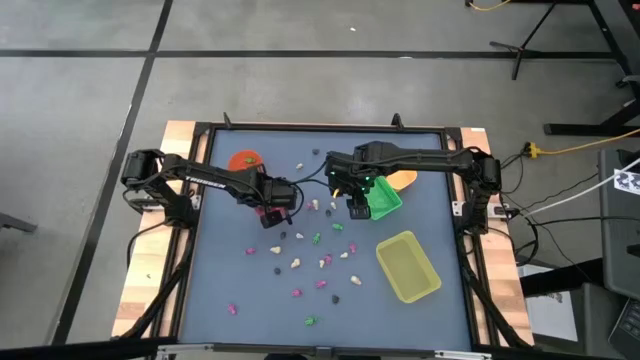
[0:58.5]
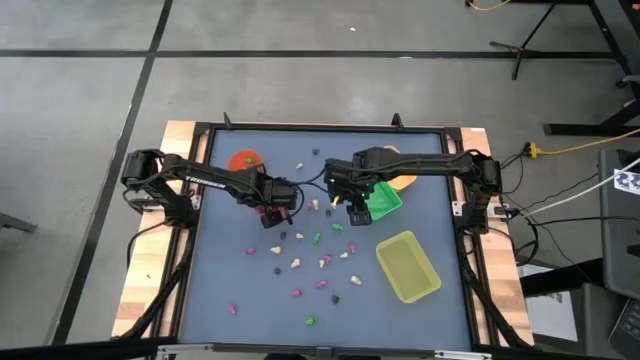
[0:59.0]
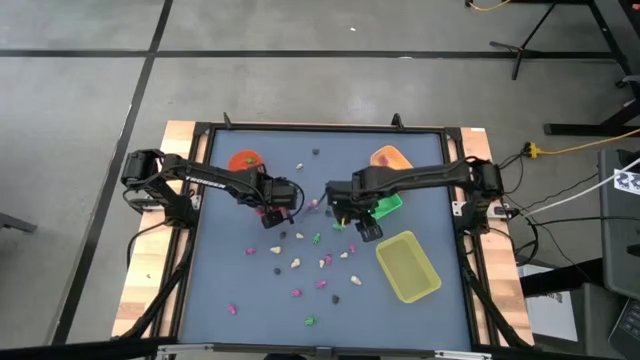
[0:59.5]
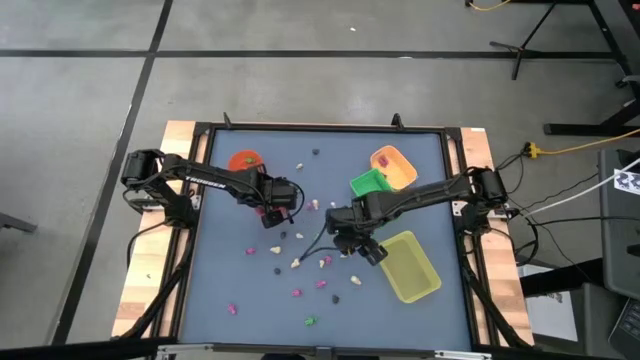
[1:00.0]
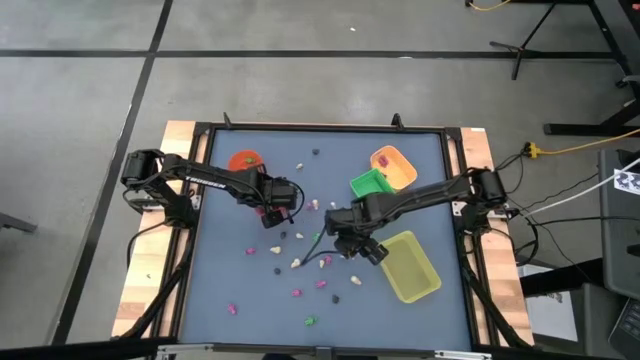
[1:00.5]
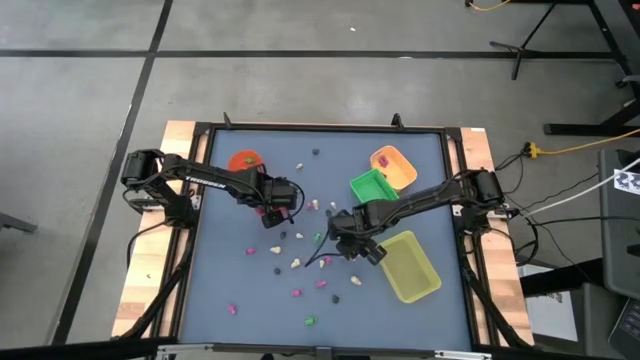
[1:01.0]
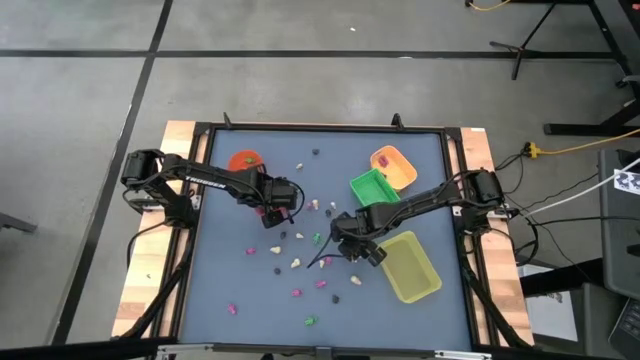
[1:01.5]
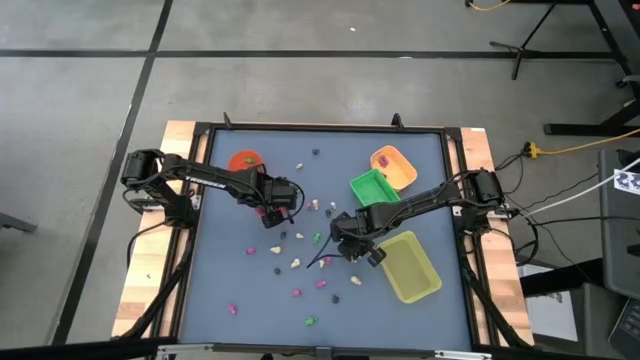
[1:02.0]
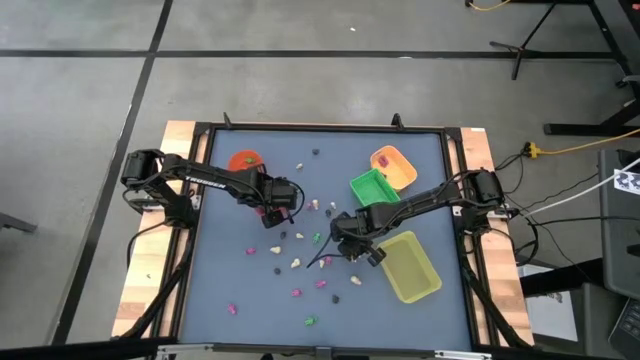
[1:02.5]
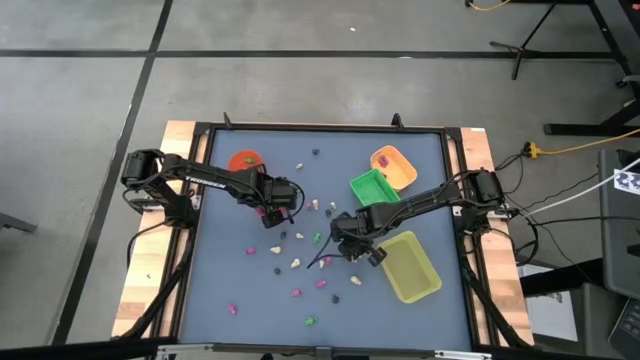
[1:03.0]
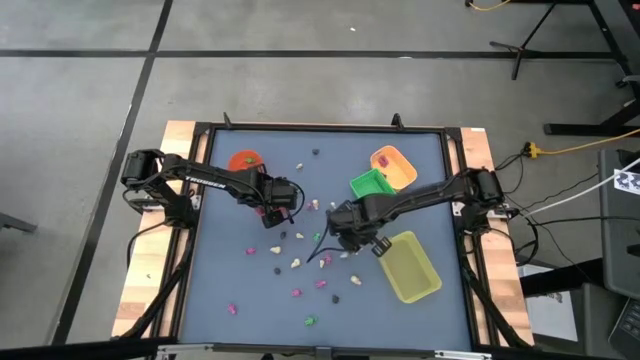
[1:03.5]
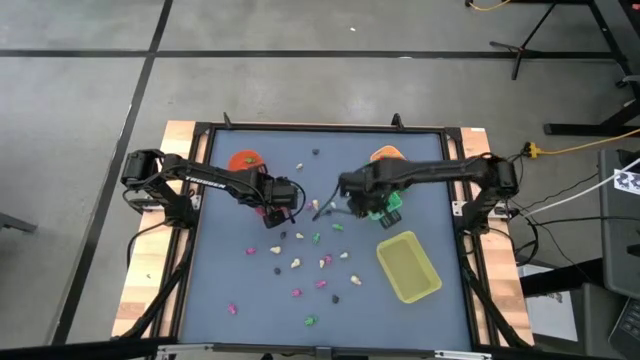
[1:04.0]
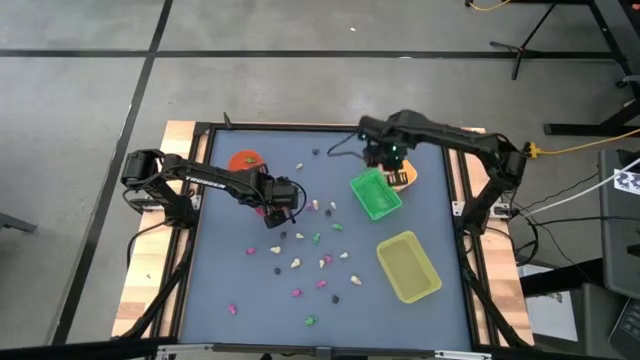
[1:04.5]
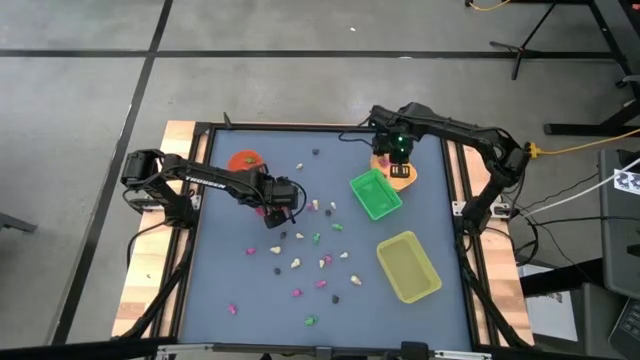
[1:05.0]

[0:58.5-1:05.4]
Task: Sort Halloween decoration
Put the pink skeleton toy into the yellow bin

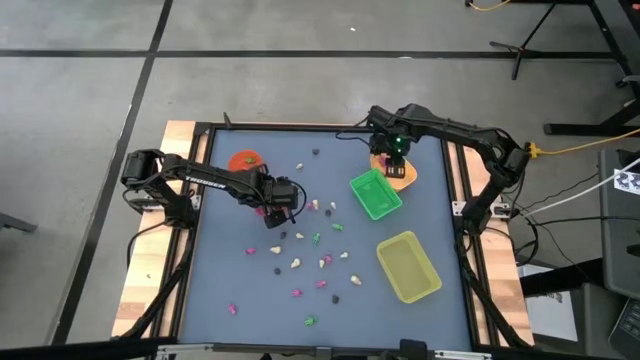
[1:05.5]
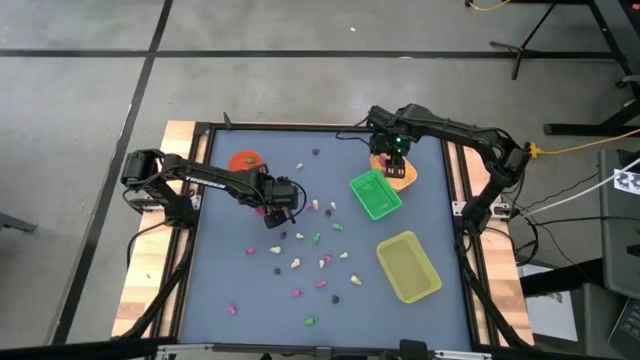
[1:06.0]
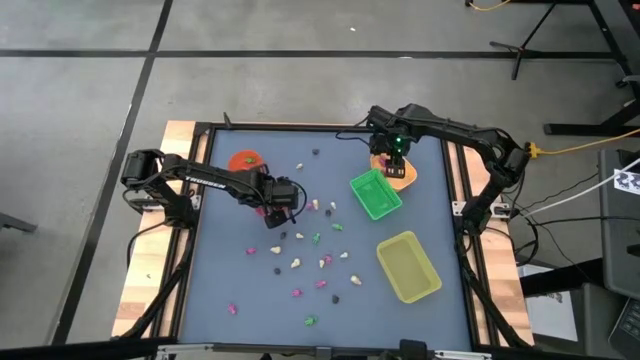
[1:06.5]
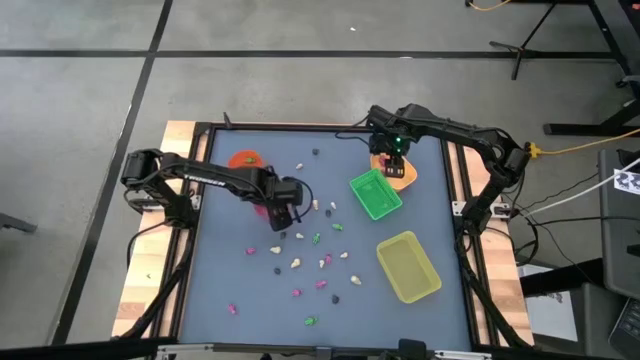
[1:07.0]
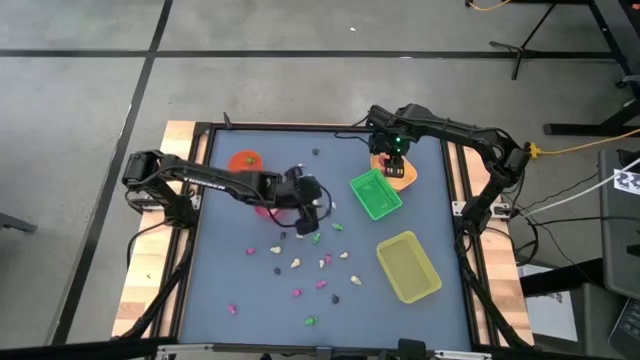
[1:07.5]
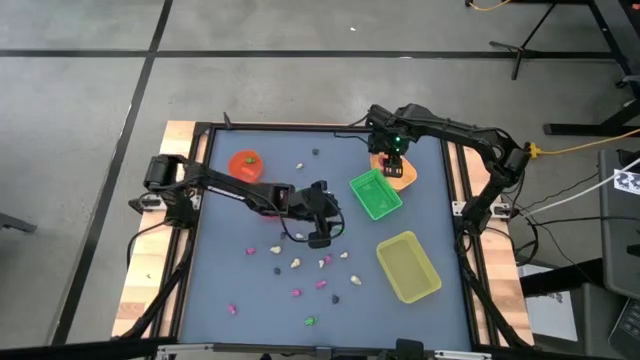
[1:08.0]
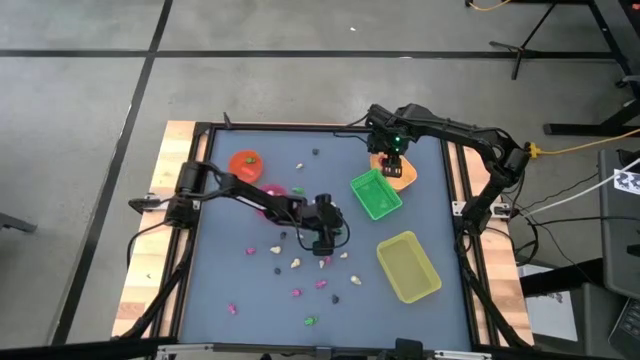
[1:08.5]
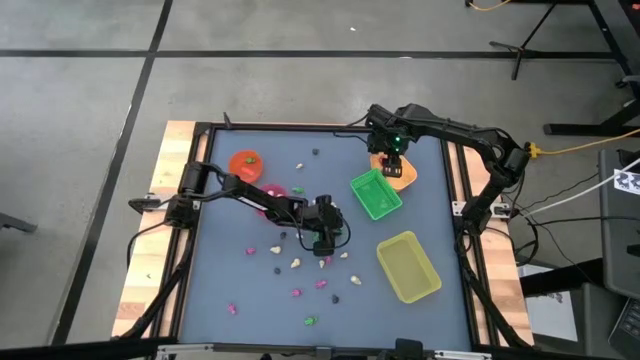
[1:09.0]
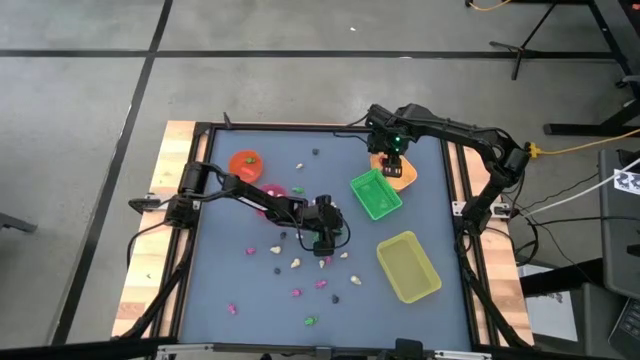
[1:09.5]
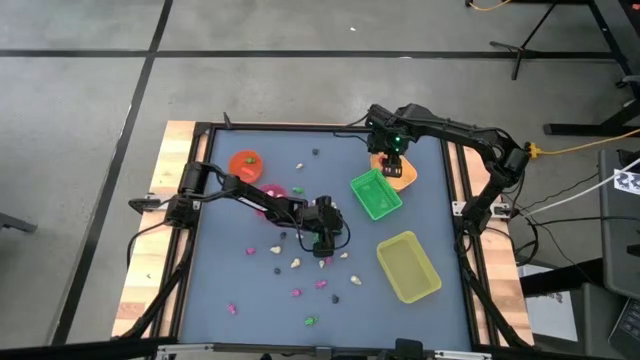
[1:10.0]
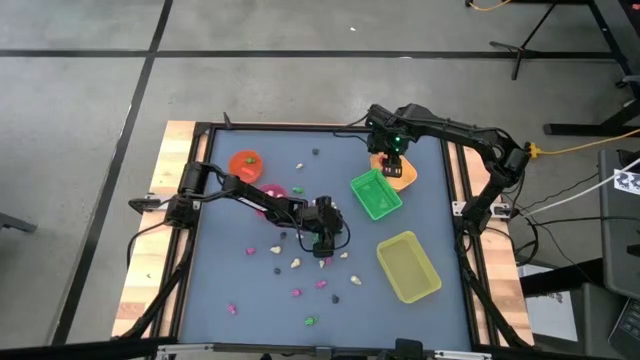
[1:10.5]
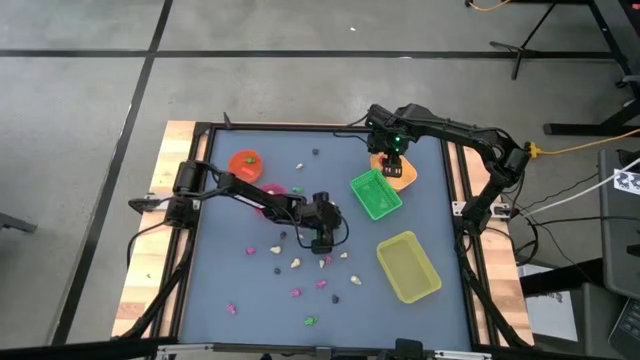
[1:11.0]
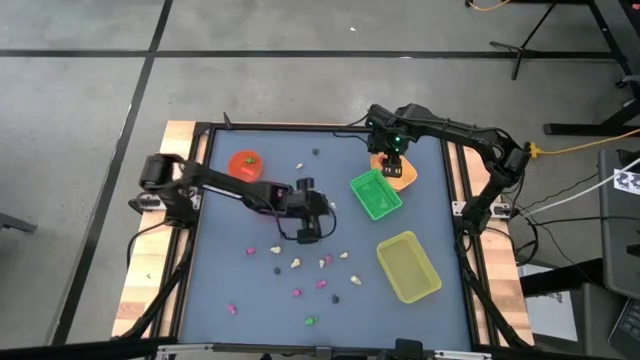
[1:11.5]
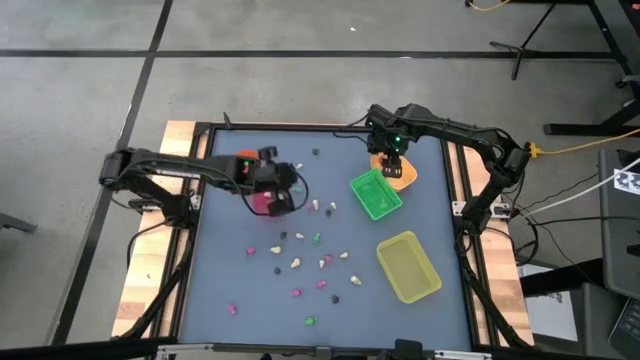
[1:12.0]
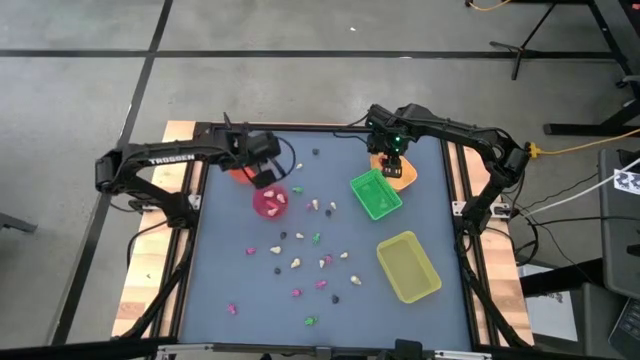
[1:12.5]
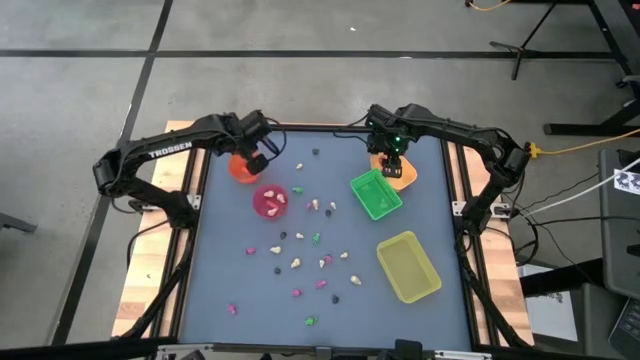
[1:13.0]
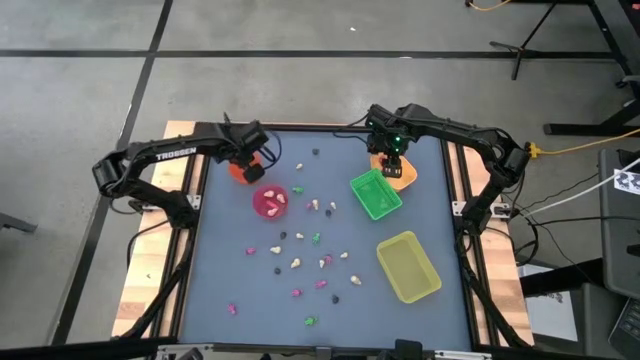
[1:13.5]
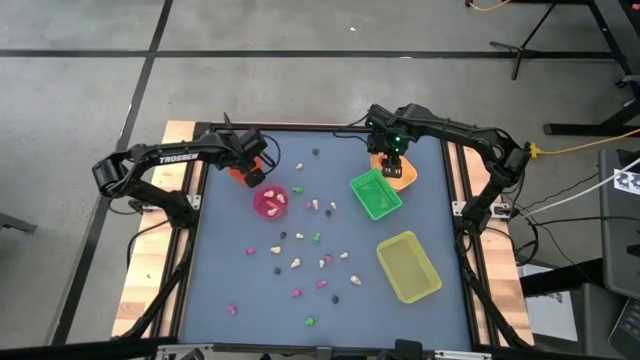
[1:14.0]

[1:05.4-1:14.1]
Put the green skeleton toy into the orange bin

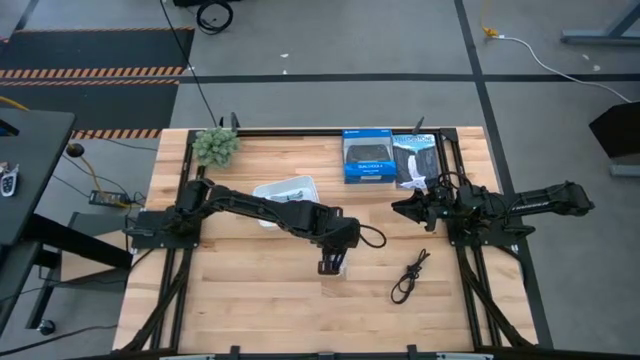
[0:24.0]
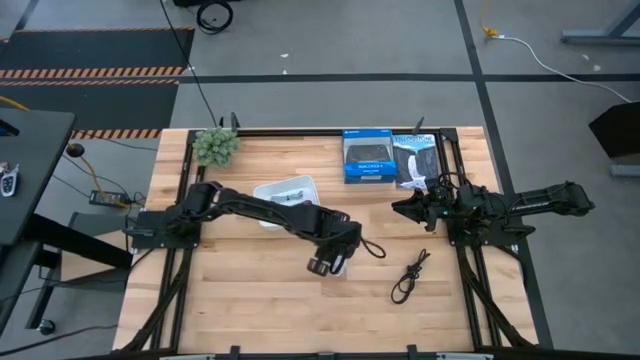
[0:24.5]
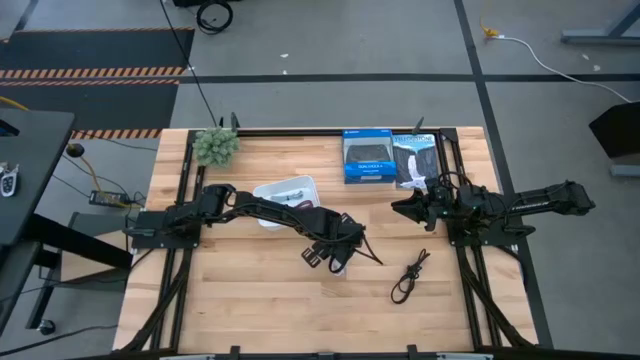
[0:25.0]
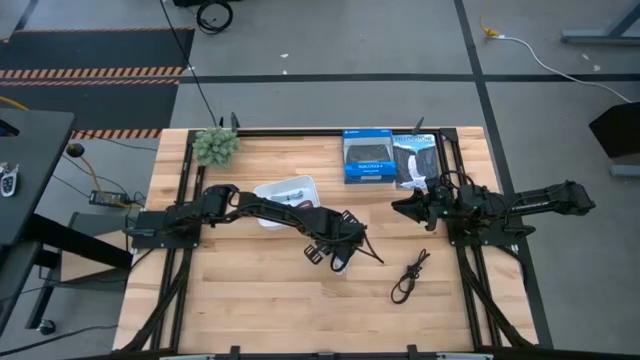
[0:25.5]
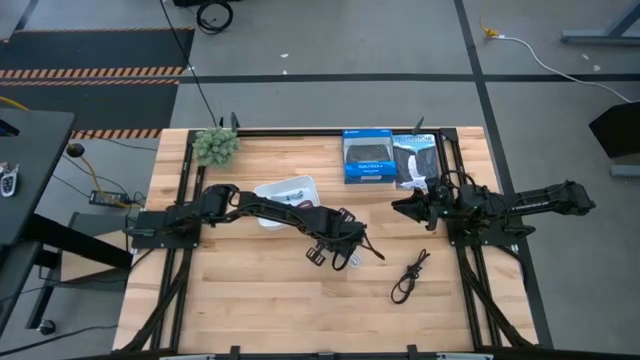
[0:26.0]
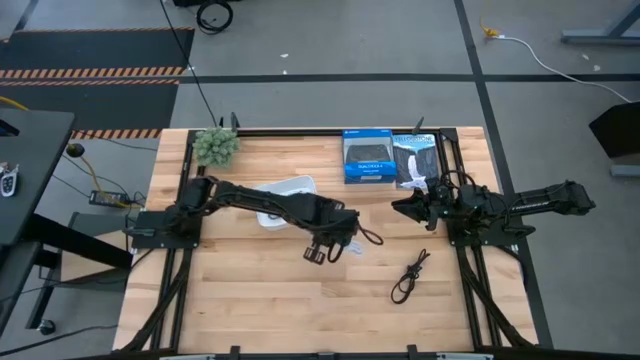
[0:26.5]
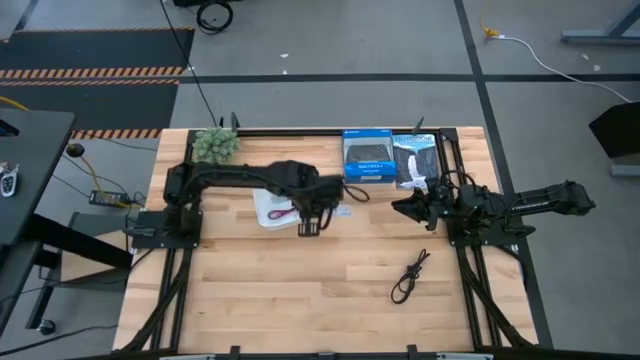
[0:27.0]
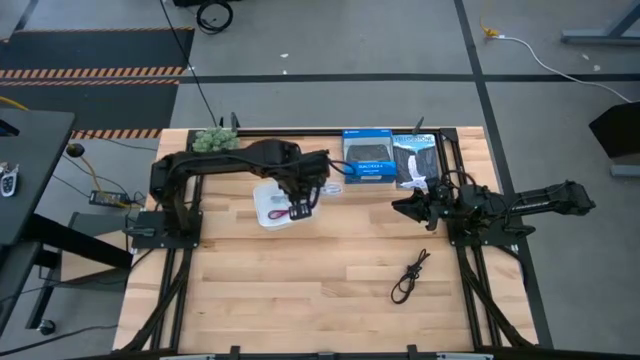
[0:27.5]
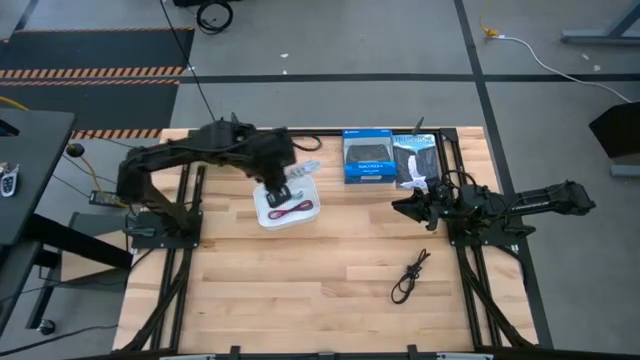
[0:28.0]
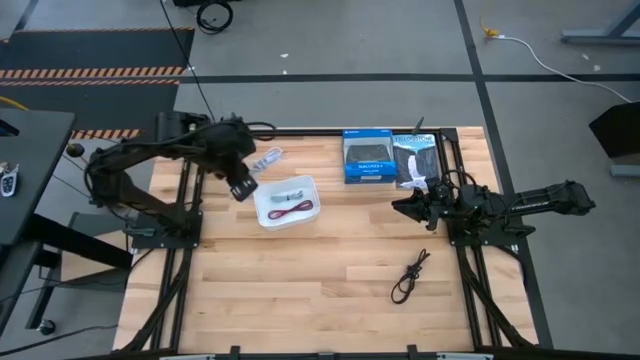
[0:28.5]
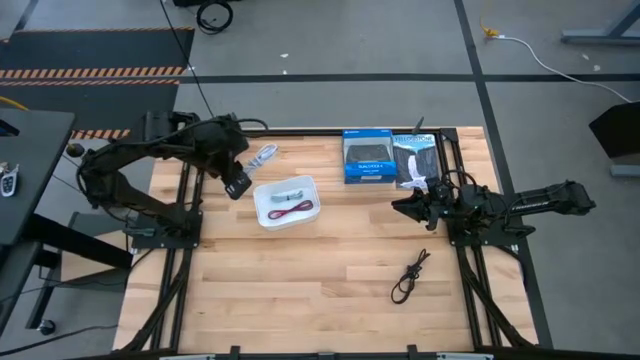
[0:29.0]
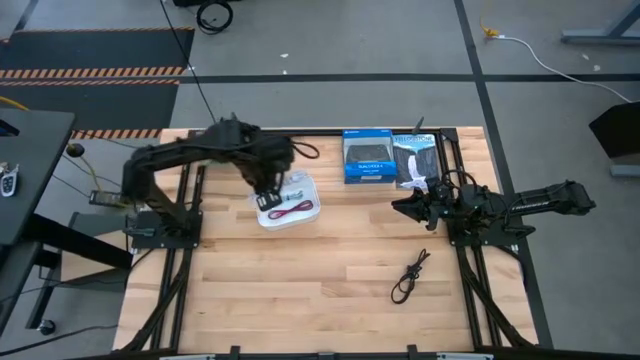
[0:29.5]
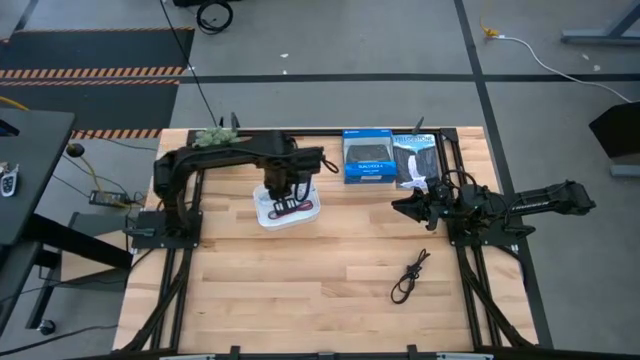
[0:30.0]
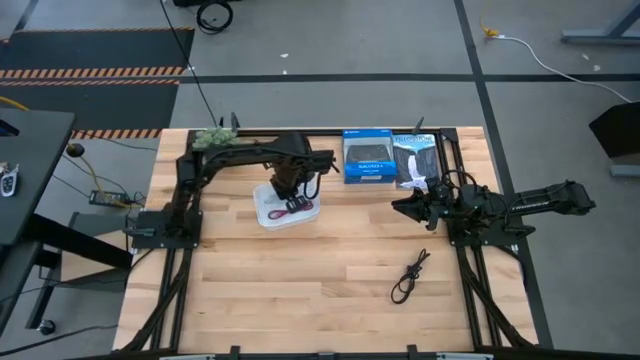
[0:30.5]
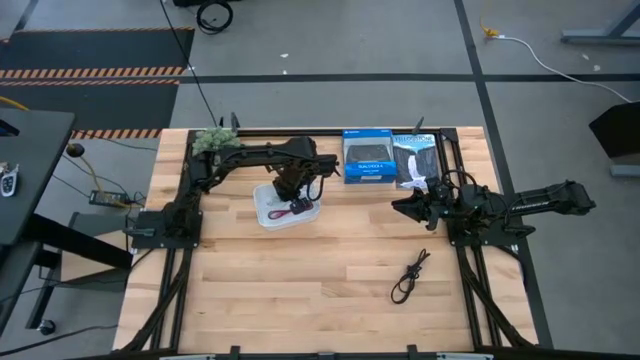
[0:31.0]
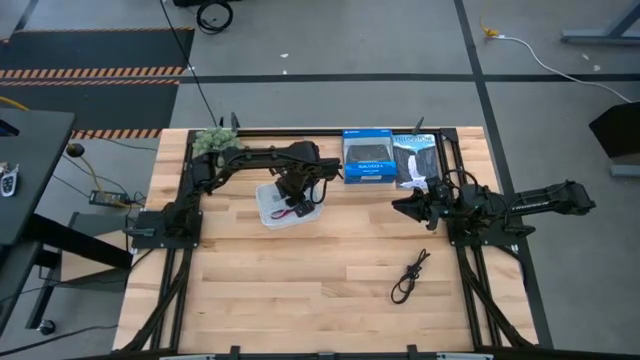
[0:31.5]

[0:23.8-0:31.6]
Task: Pick and place USB-C Cables
Put the white cable charger into the white bin
